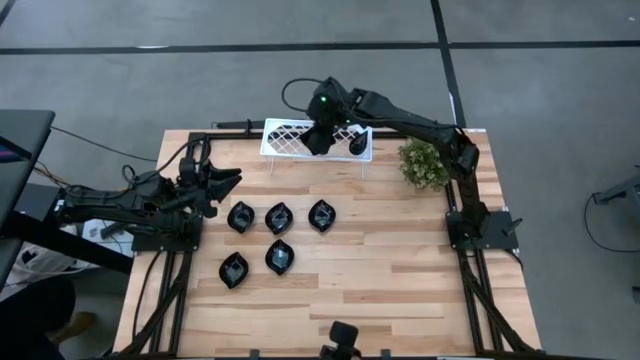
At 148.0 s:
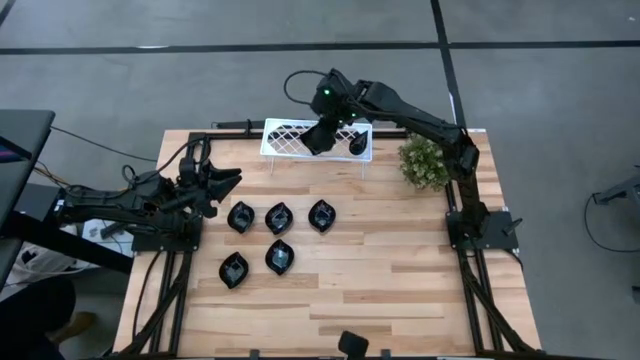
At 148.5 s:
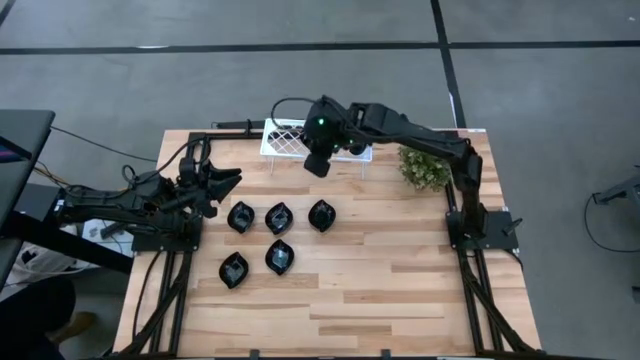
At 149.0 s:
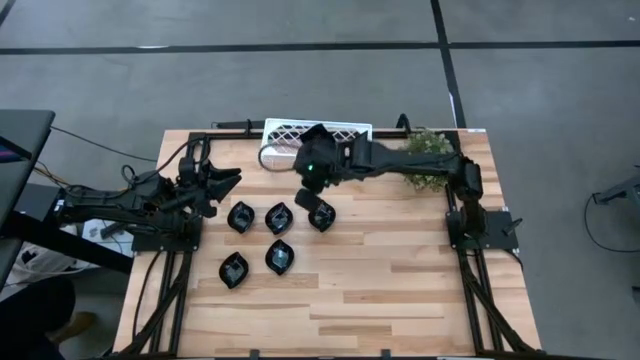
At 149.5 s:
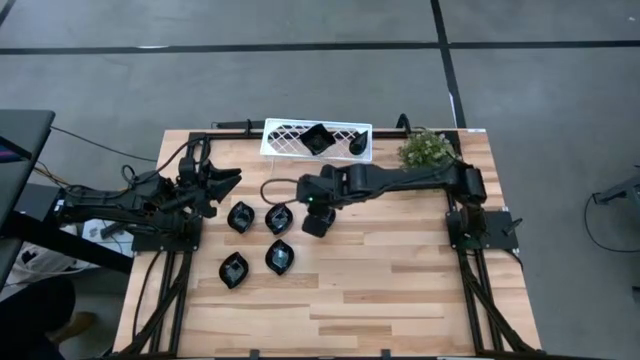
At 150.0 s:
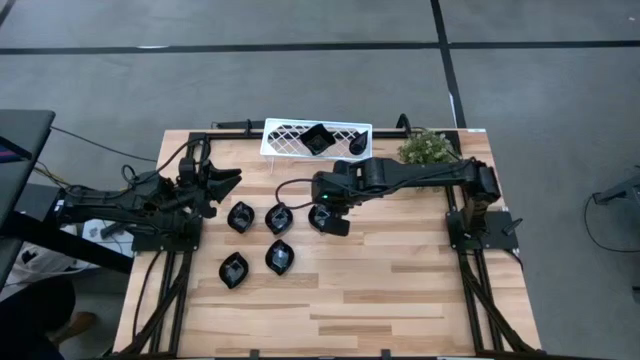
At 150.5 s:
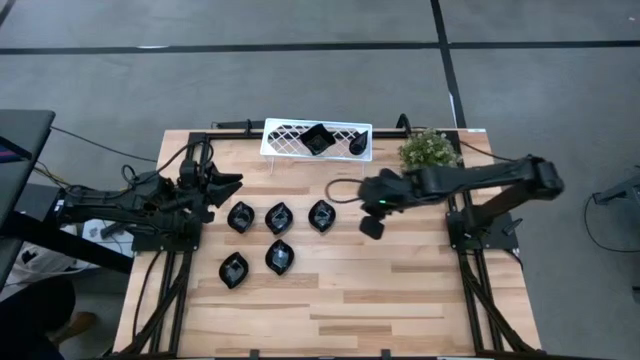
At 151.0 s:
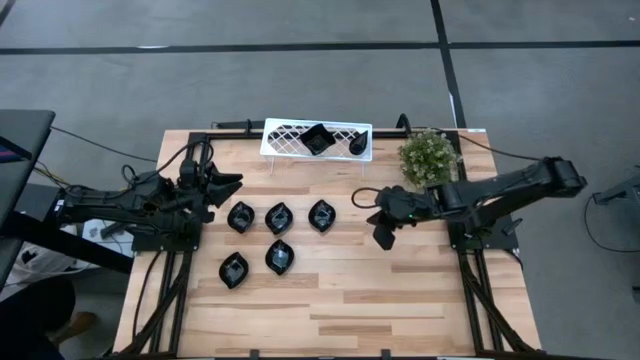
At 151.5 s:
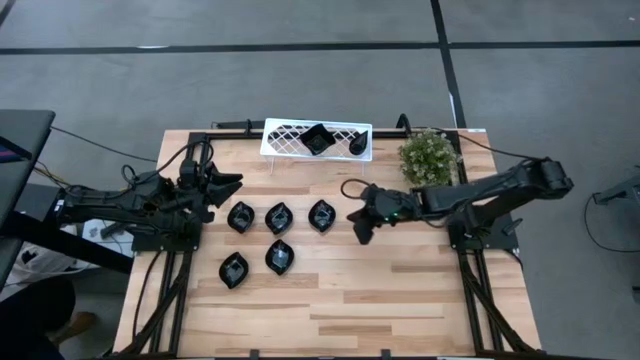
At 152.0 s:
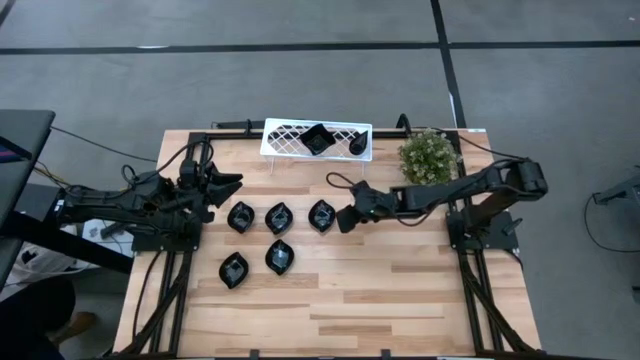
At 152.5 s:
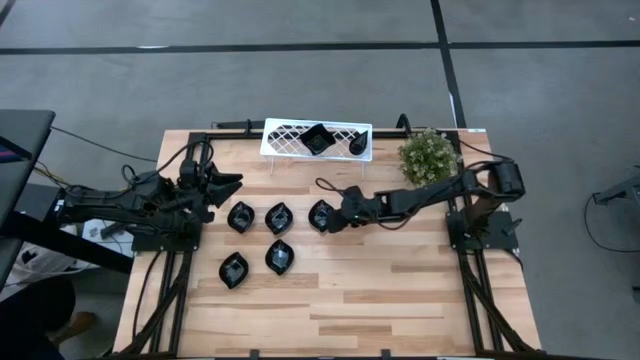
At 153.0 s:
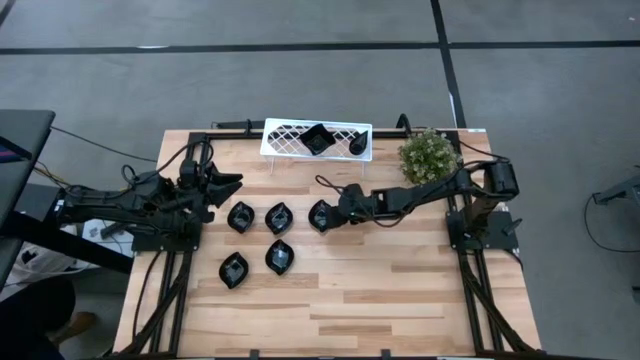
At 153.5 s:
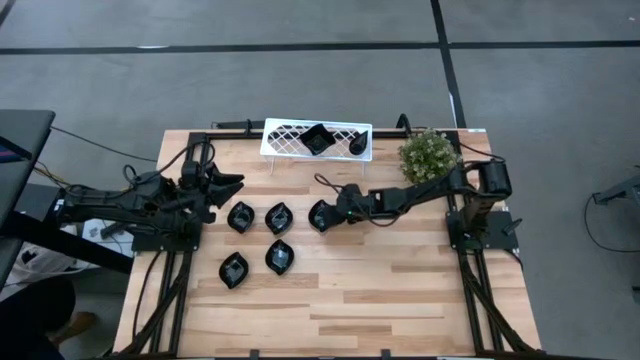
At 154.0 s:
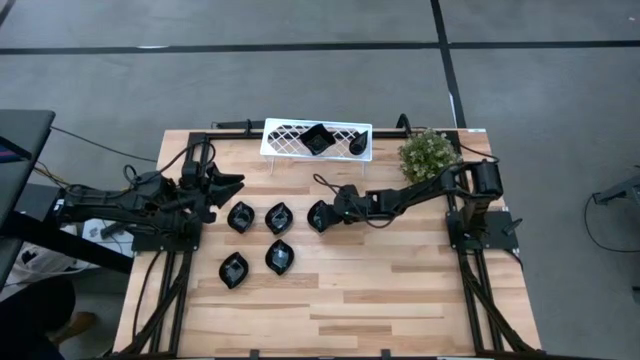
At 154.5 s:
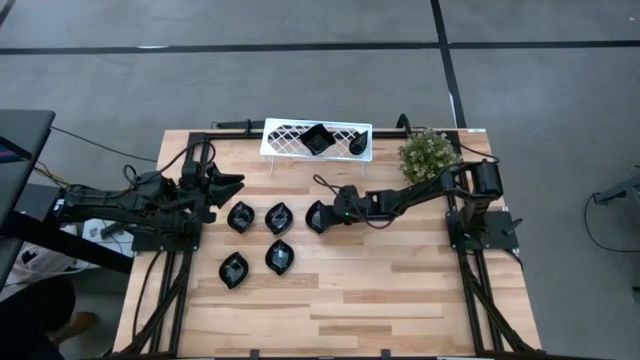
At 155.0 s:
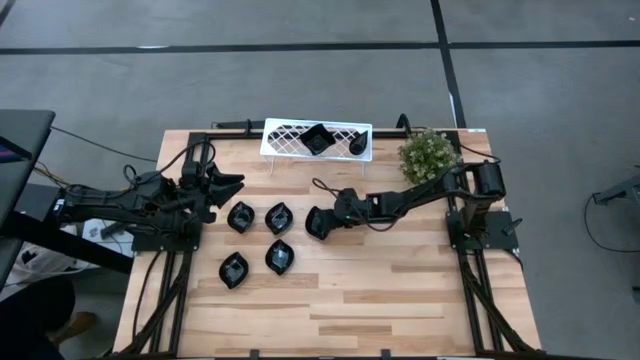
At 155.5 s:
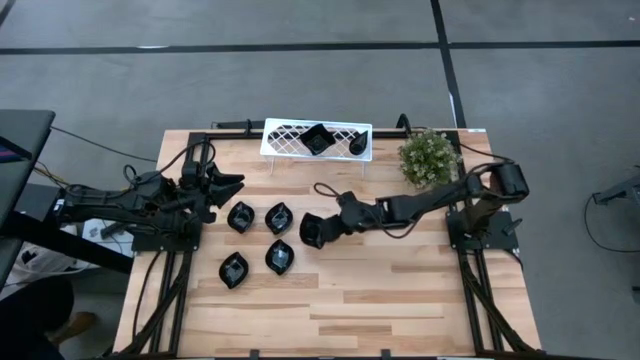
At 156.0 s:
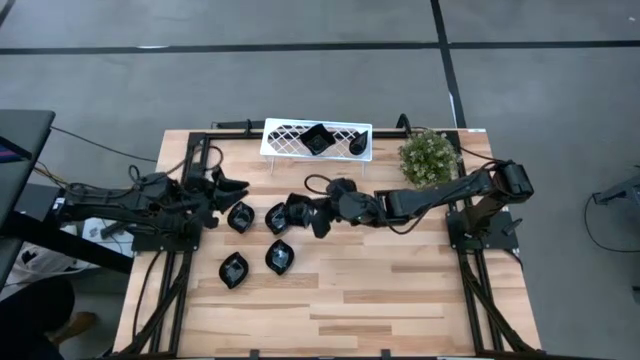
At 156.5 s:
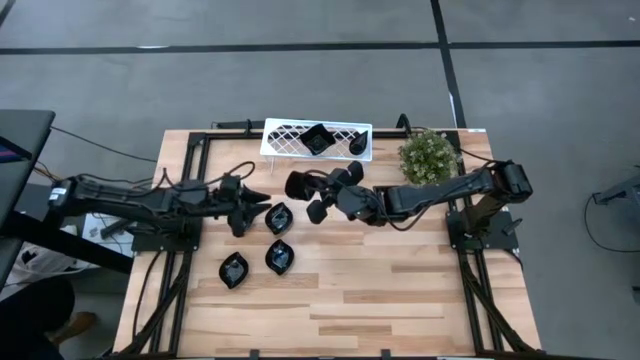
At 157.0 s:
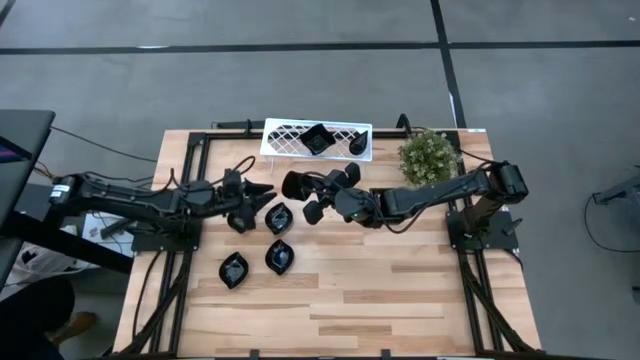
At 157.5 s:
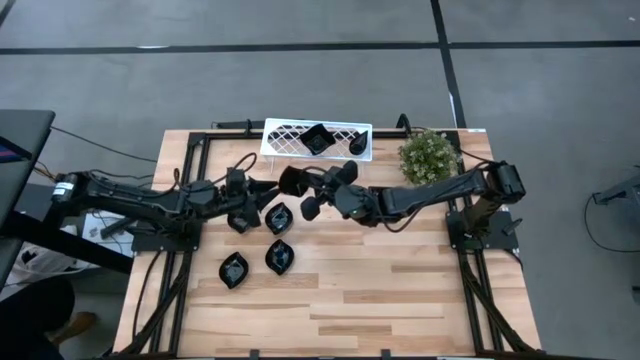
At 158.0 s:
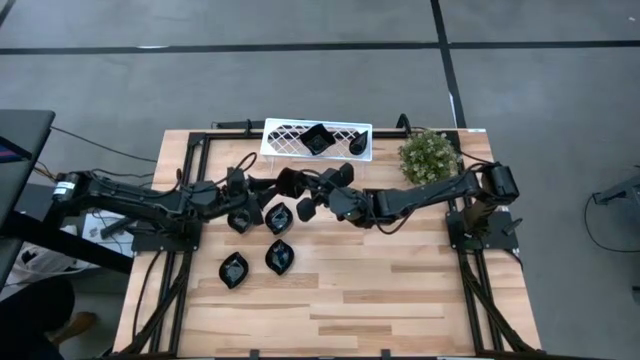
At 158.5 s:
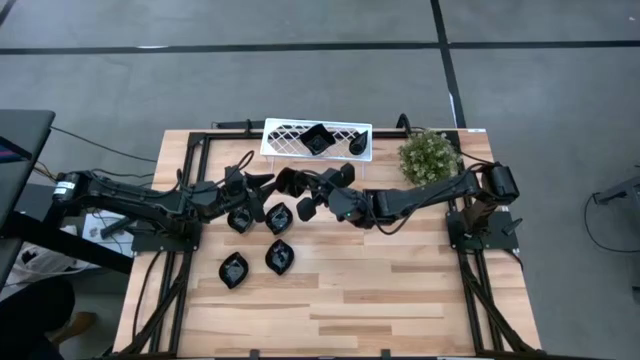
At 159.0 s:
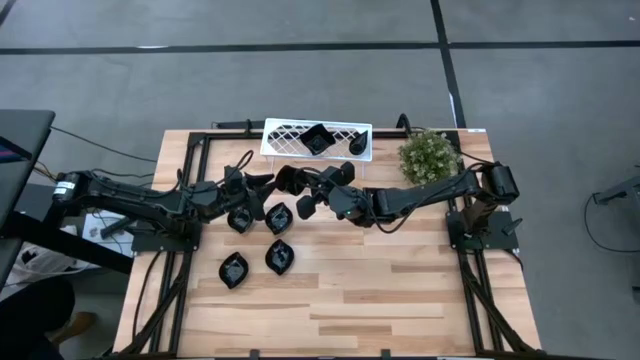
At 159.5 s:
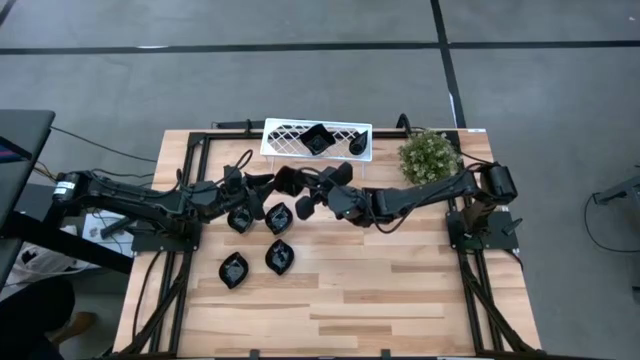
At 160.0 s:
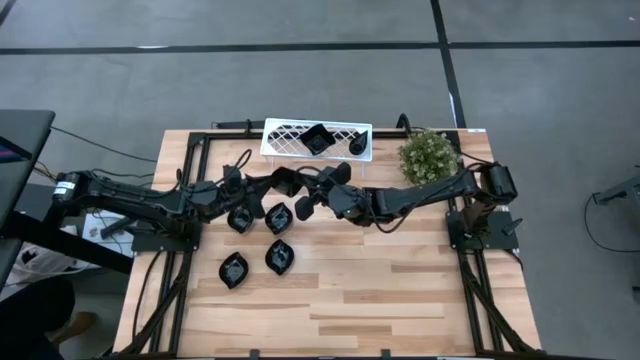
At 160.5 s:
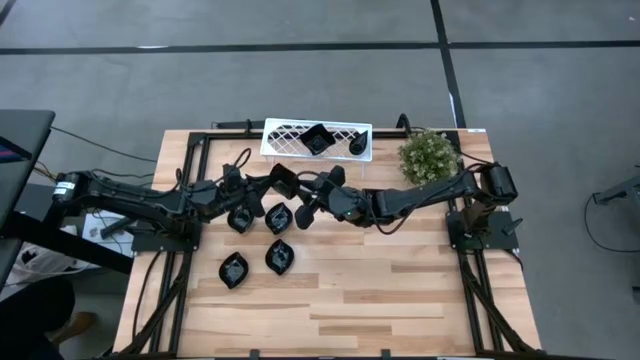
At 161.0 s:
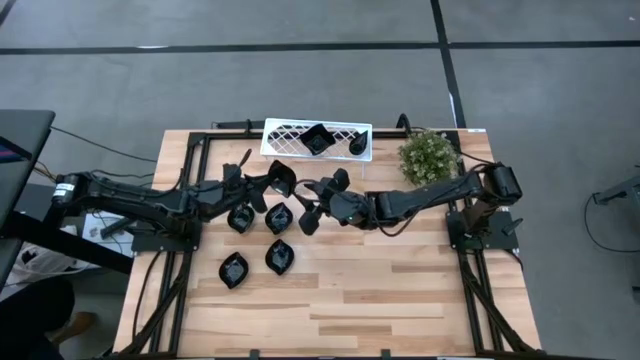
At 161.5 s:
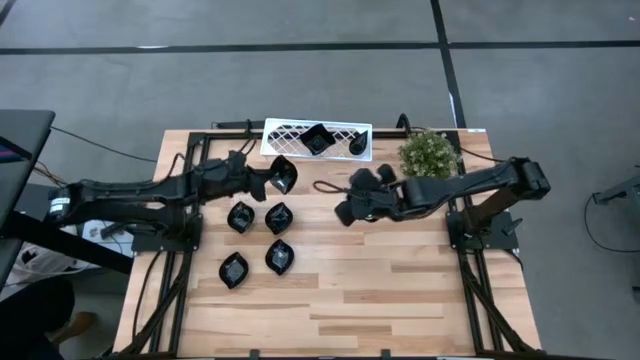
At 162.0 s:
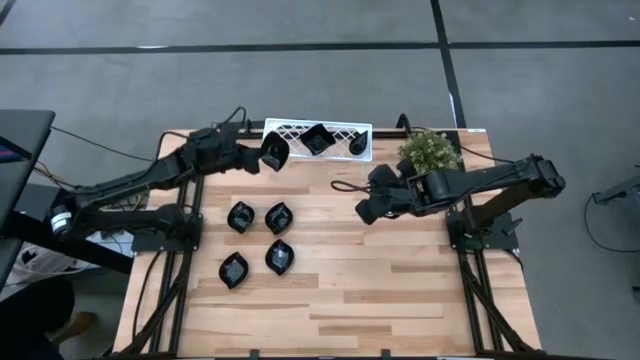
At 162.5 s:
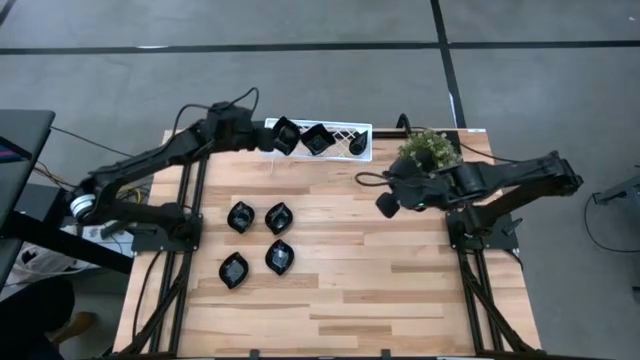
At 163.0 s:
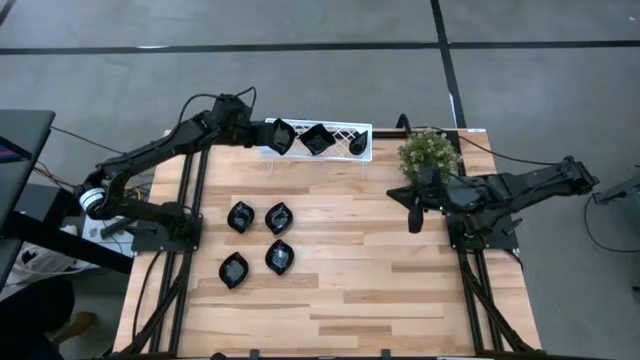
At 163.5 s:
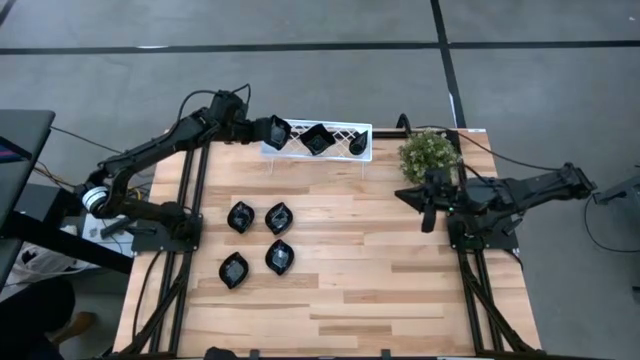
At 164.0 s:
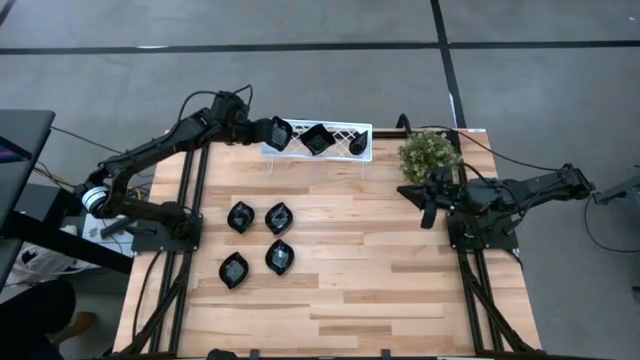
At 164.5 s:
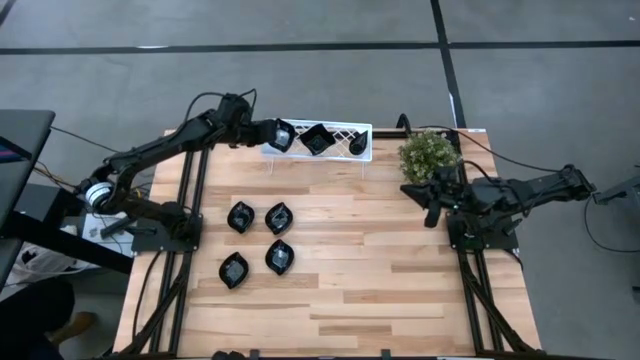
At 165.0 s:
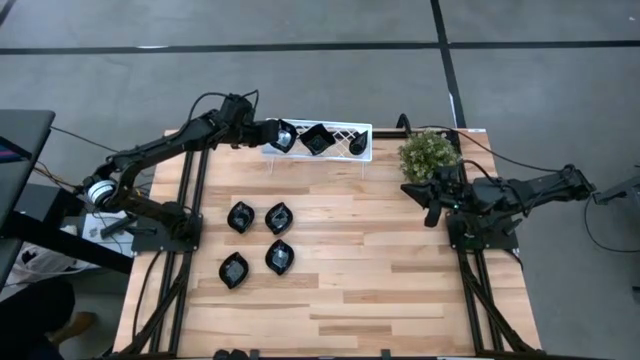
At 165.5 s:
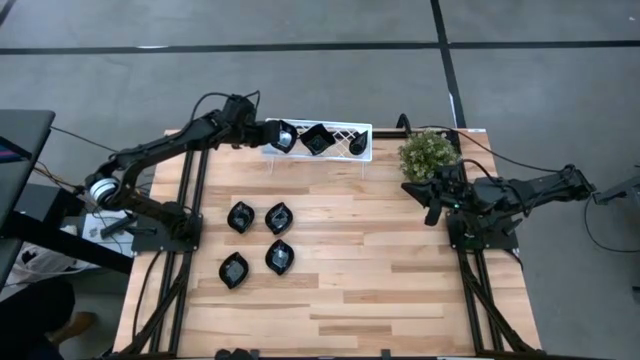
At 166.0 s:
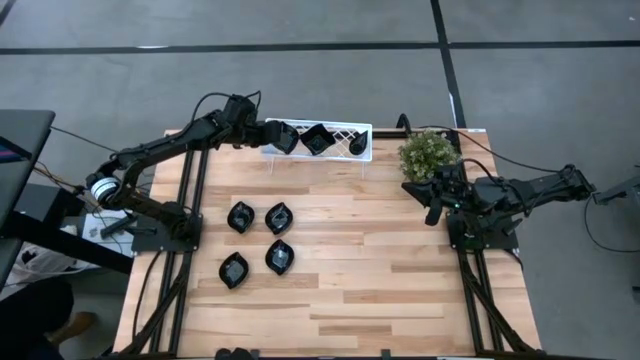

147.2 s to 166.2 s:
Task: Pick & Place Mini shaped plates
Put the black leaf shaped plate on the shelf

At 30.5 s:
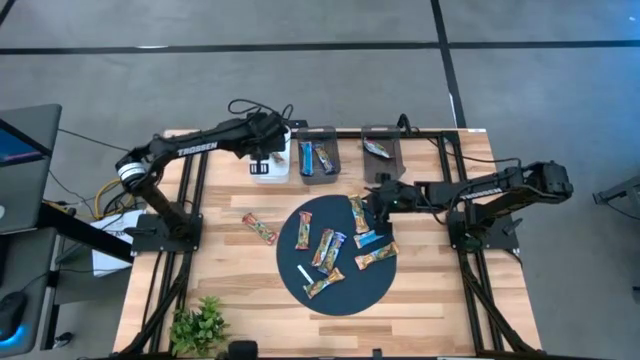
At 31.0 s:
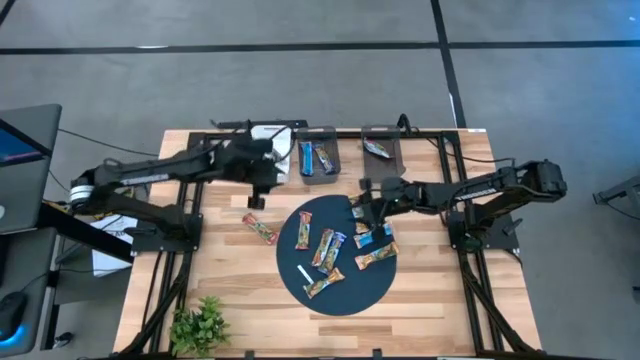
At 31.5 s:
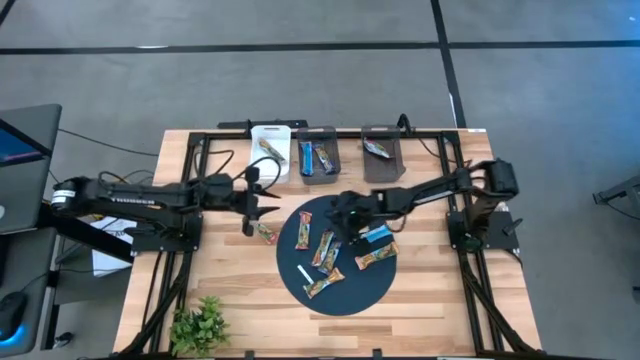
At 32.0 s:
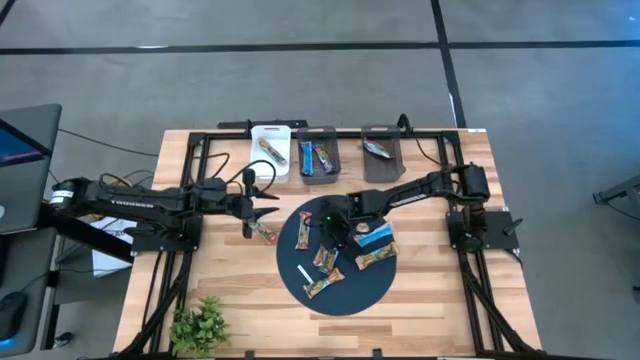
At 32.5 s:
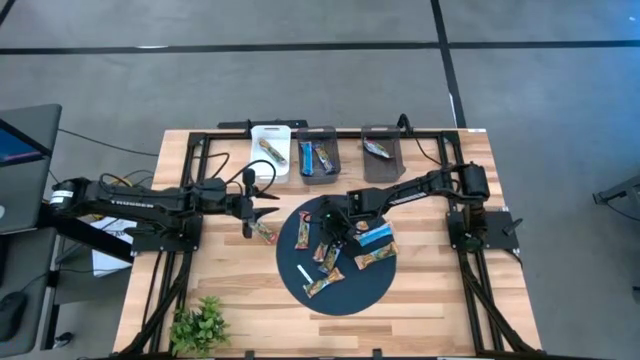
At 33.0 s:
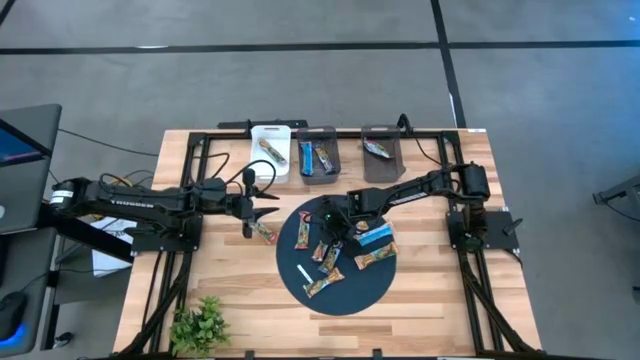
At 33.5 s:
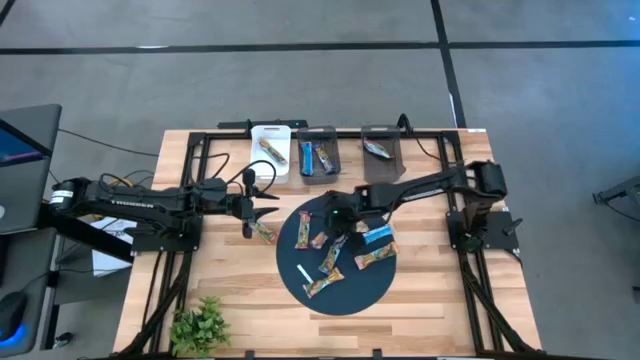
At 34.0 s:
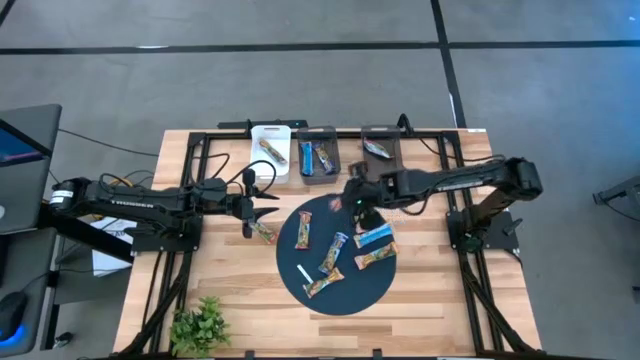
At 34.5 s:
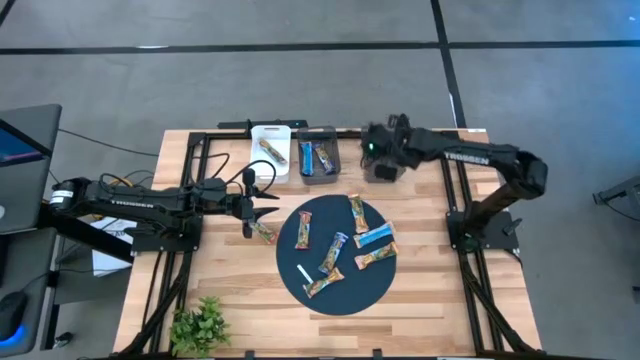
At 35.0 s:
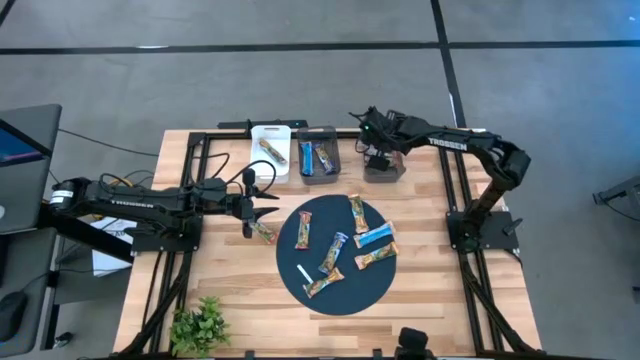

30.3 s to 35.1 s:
Task: Pick and place Granola Bars by type
Put the red granola bar into the right black bin
